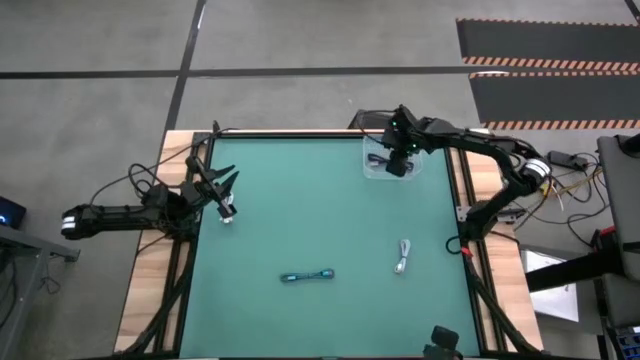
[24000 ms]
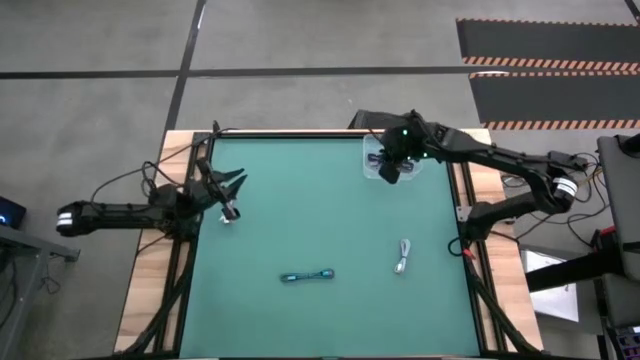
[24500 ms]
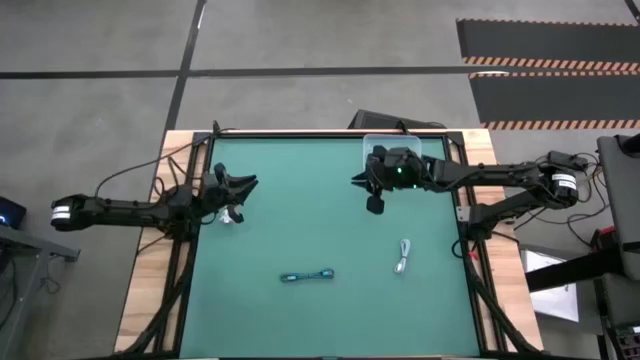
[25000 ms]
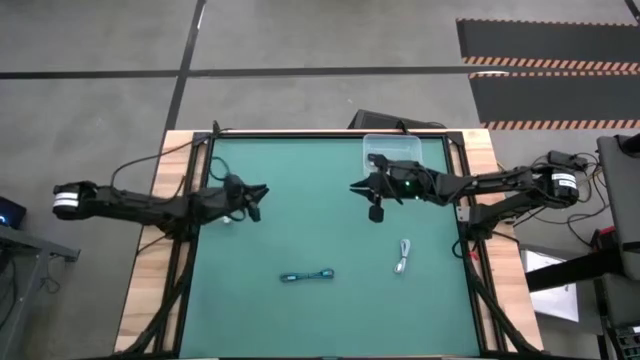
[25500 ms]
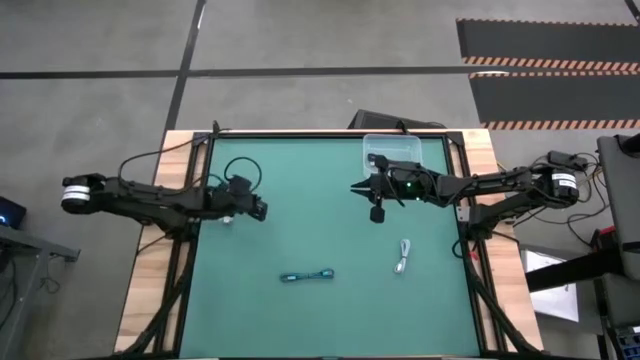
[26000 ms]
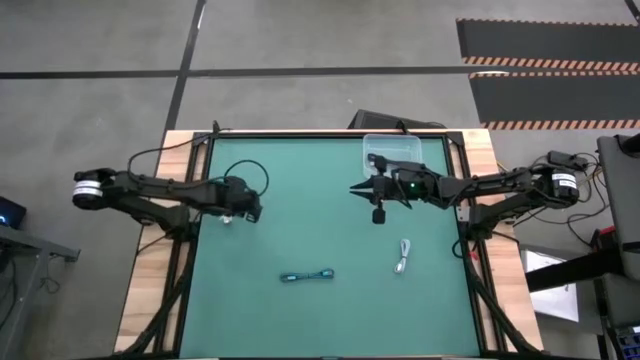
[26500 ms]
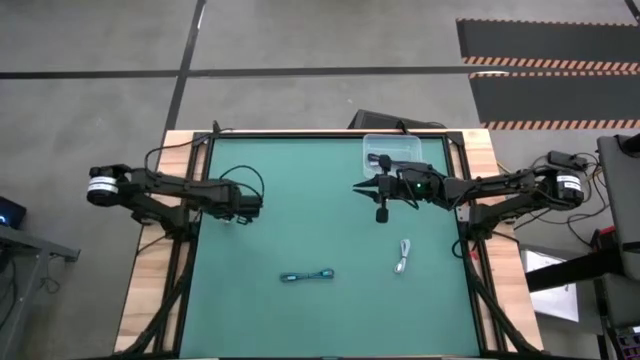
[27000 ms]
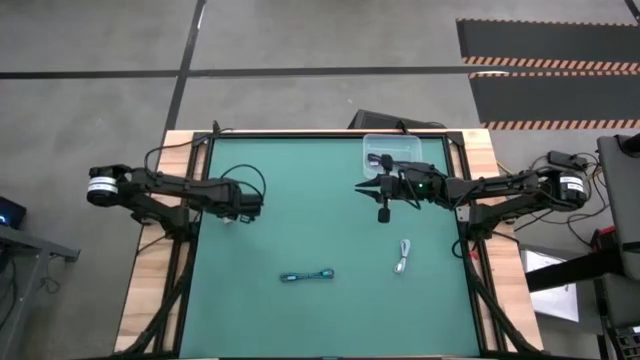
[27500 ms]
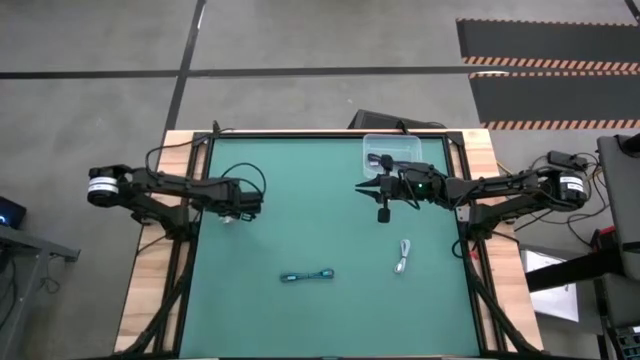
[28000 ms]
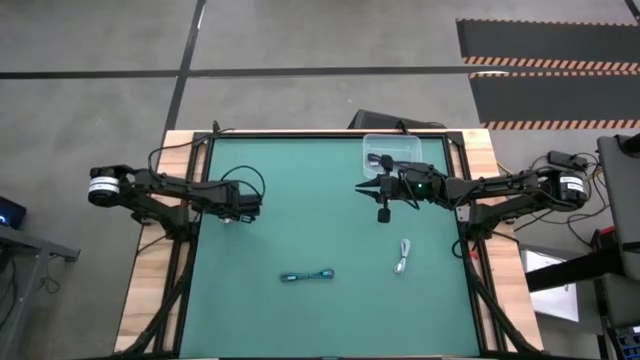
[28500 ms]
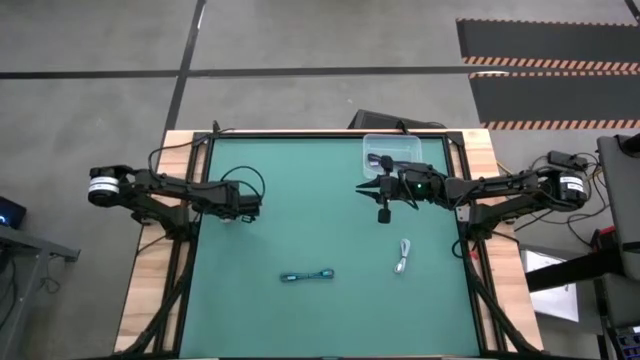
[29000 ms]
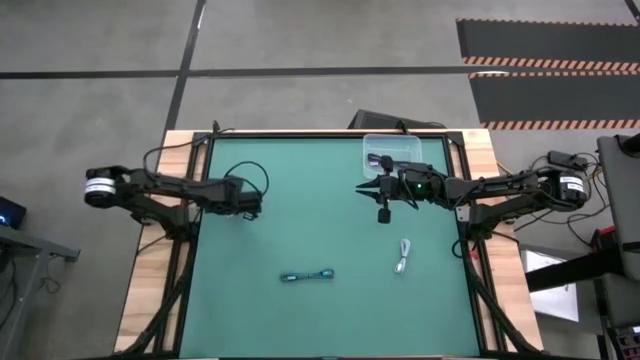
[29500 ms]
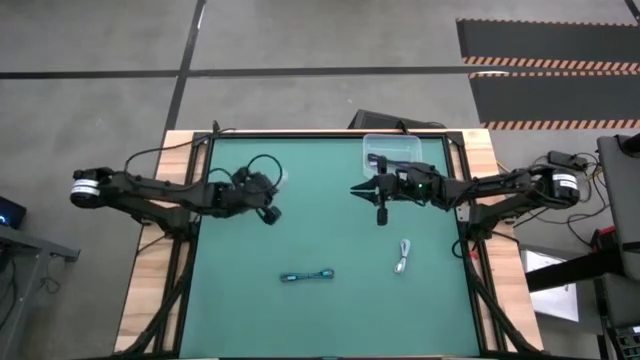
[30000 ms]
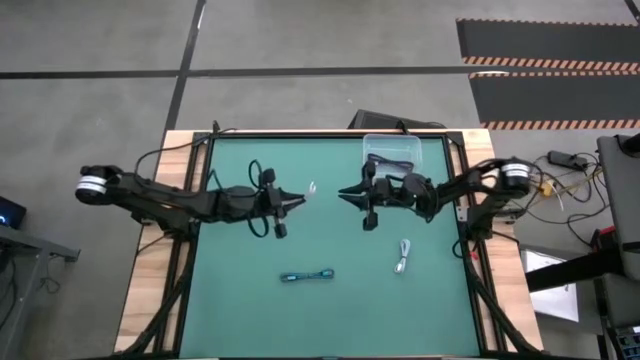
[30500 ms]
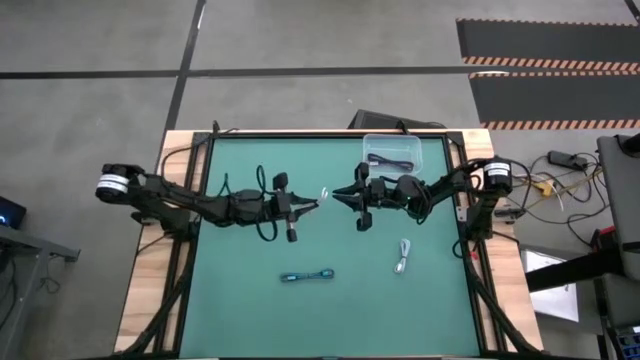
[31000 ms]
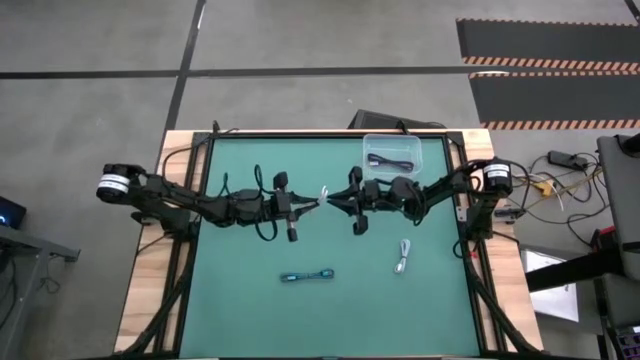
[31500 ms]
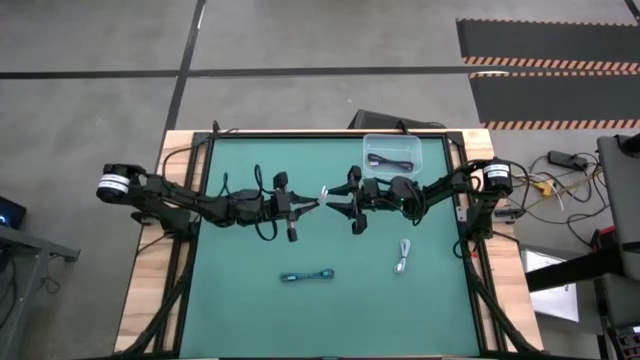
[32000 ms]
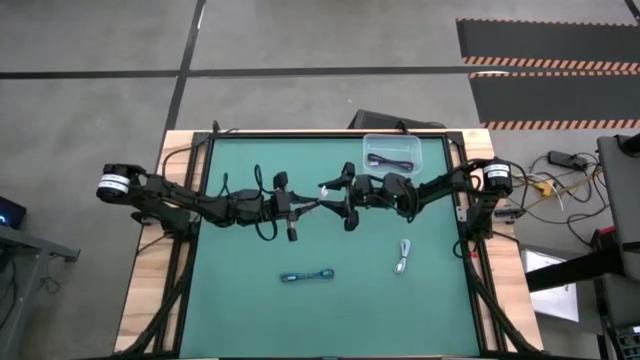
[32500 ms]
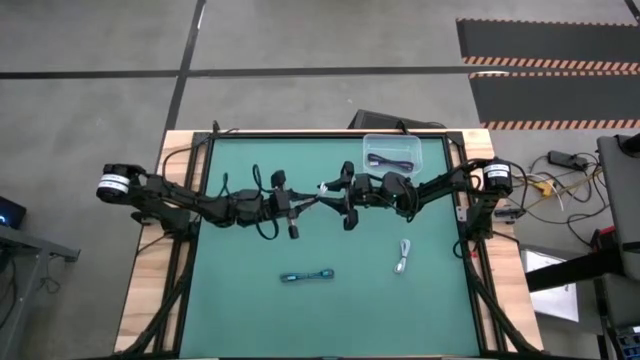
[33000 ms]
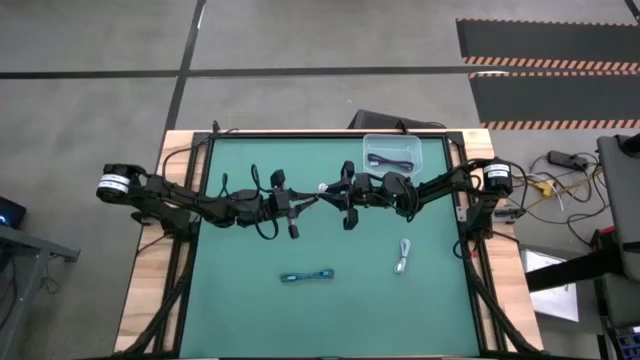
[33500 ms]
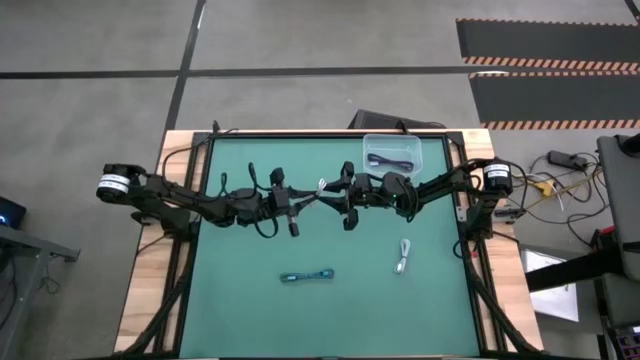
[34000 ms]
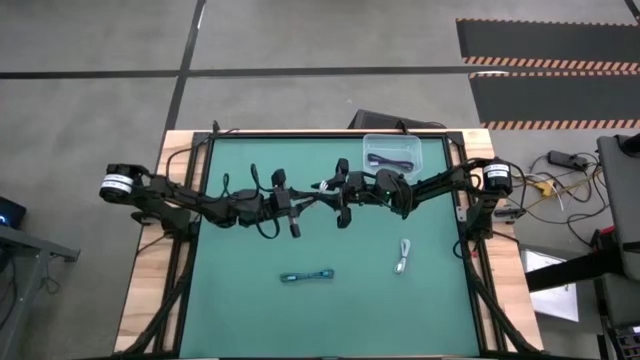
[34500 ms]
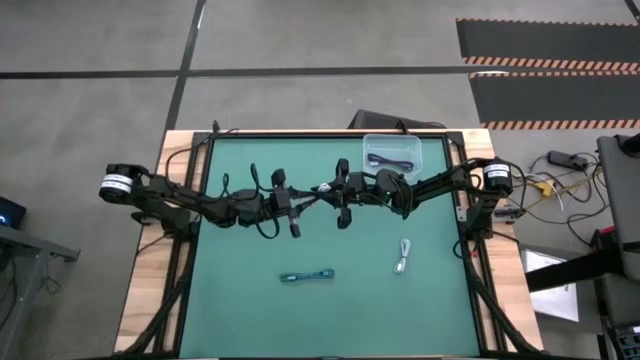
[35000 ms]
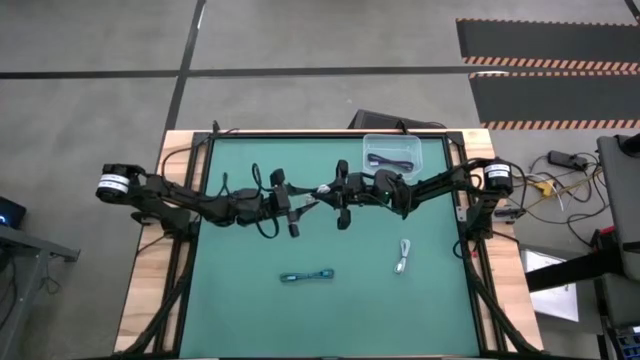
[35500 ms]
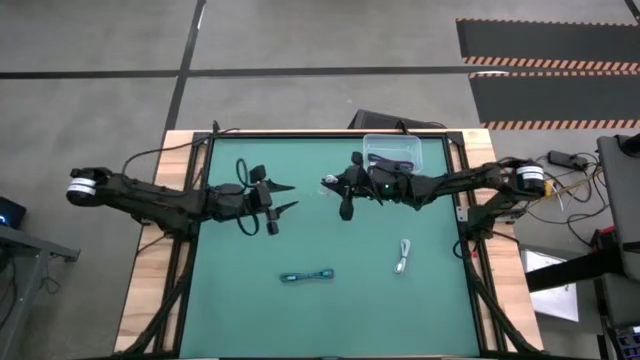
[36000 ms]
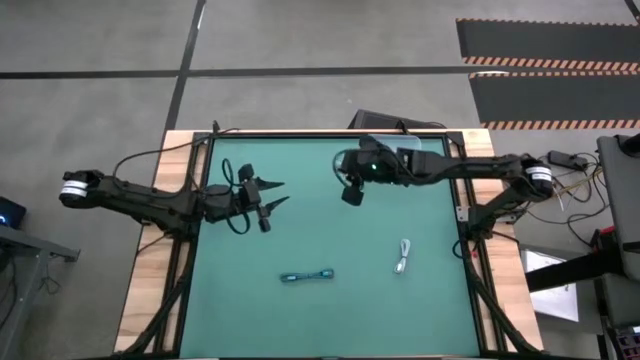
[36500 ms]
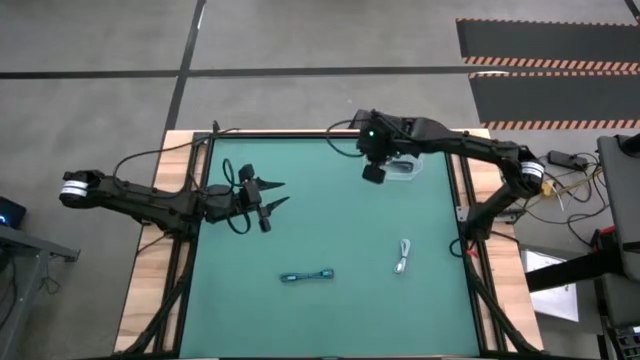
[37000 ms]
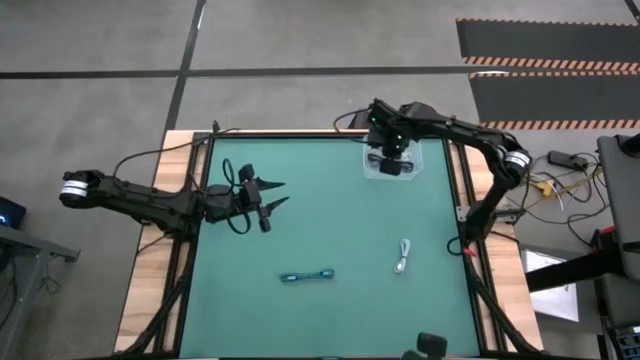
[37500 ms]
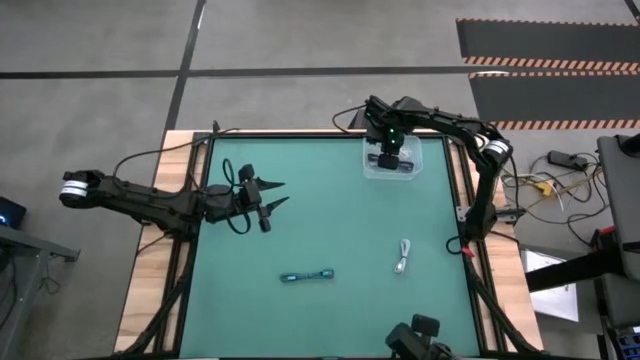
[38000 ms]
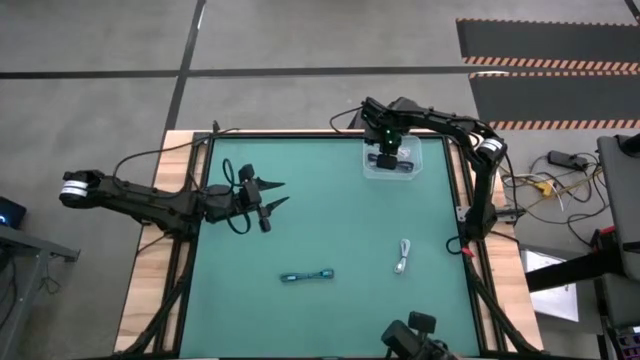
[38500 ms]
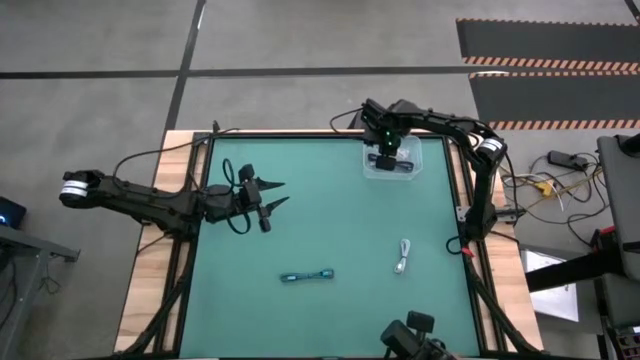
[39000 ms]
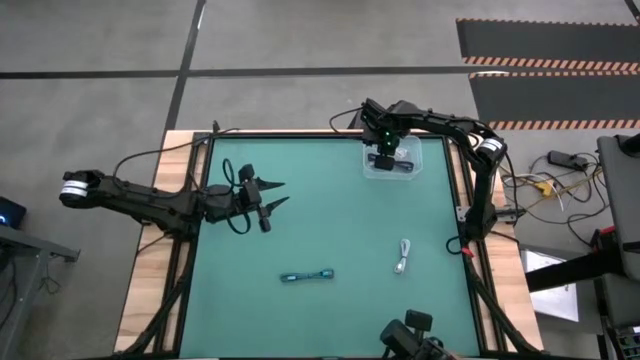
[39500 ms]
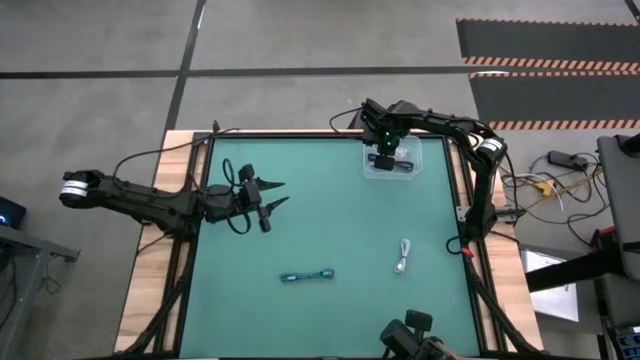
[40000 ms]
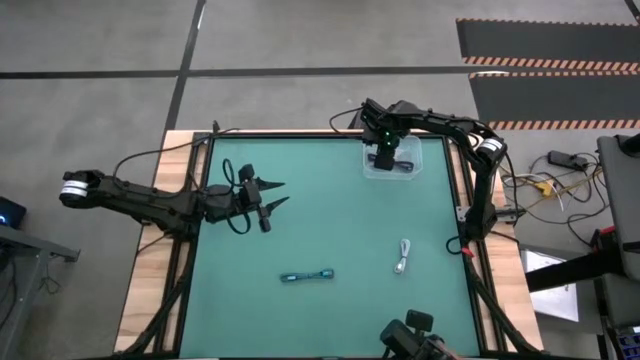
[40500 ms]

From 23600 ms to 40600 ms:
Task: Pick and place USB-C Cables
Put the white charger cable into the transparent bin

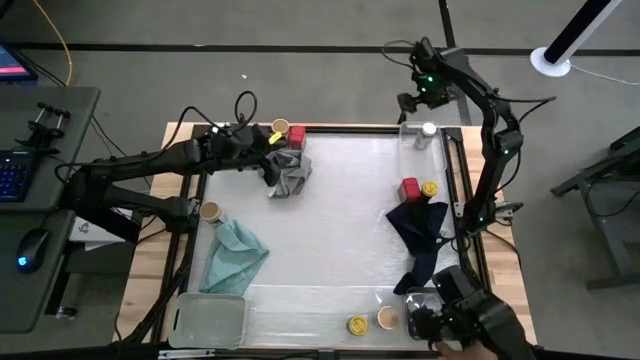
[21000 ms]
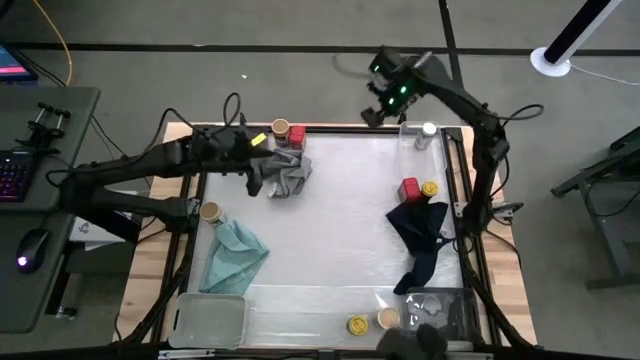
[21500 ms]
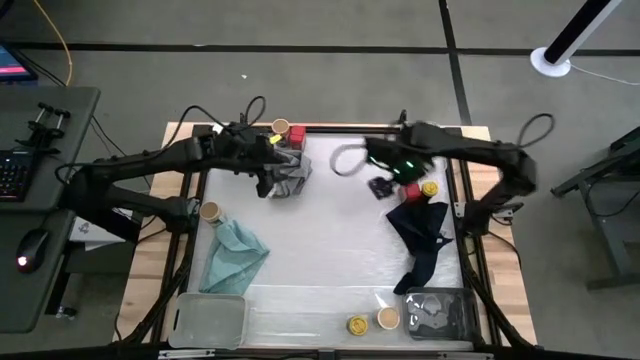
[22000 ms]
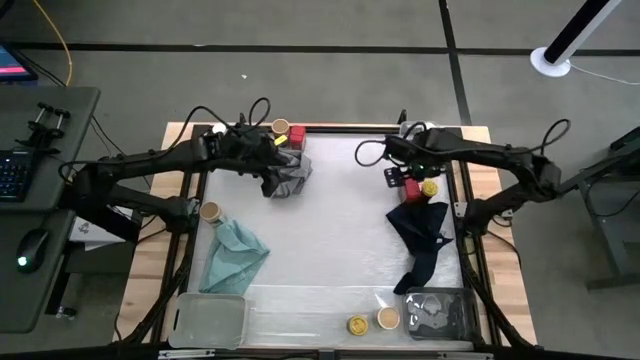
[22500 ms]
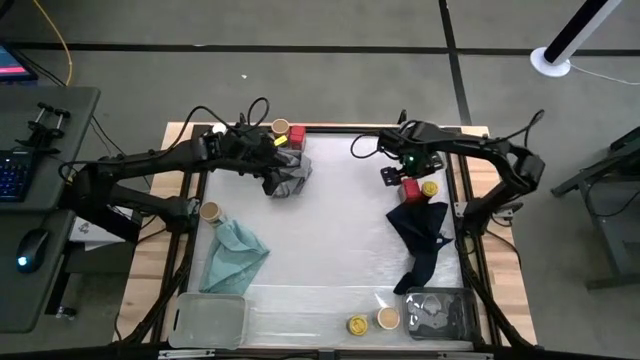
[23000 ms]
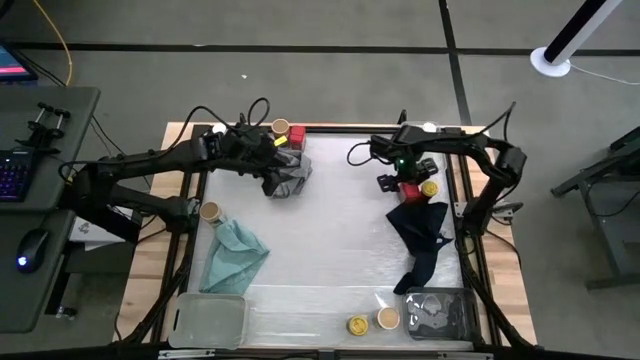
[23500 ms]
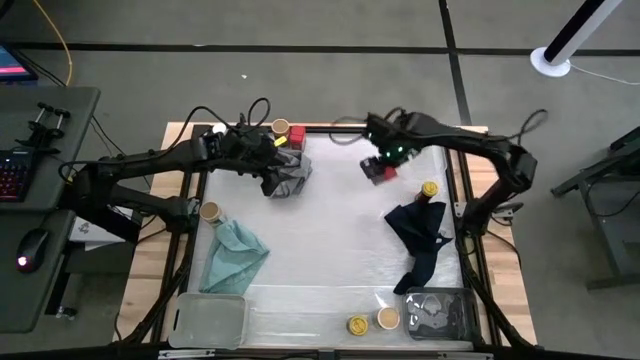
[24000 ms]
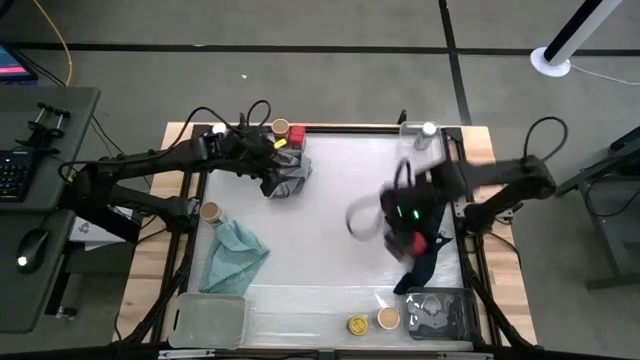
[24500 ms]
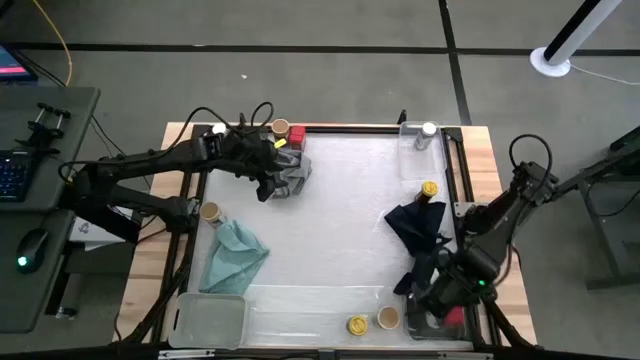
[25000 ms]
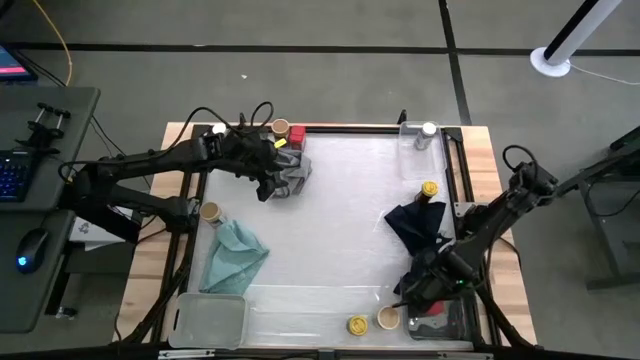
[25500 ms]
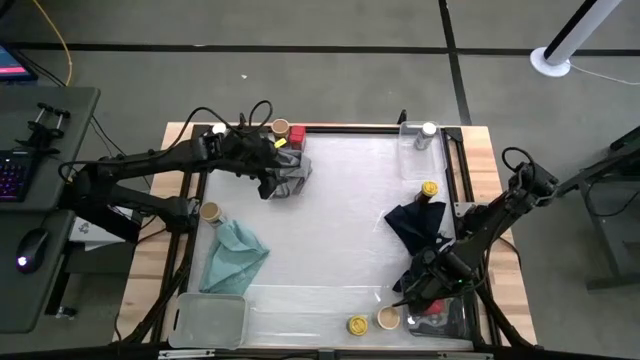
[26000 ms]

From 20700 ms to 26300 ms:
Task: Sort spices by type
Put the bottom red seasoning can into the bottom black bin
